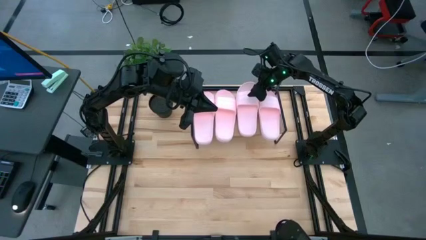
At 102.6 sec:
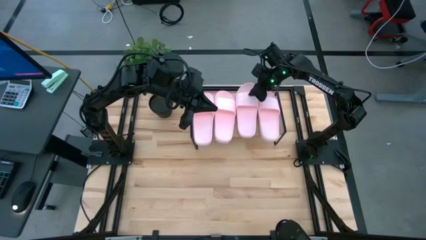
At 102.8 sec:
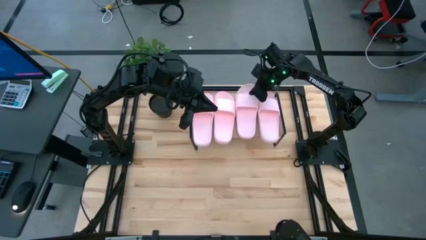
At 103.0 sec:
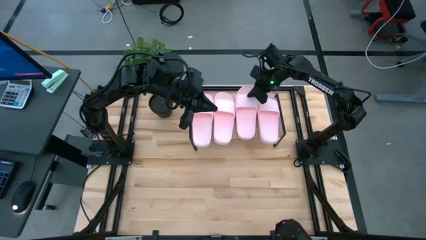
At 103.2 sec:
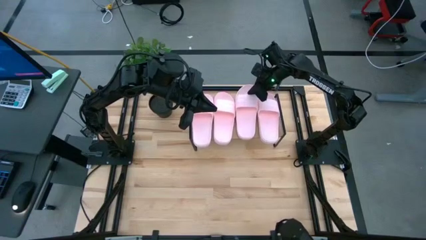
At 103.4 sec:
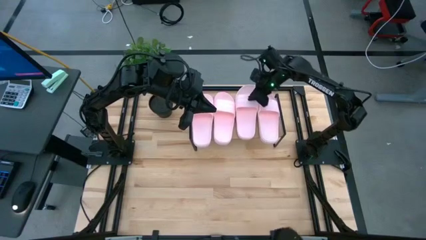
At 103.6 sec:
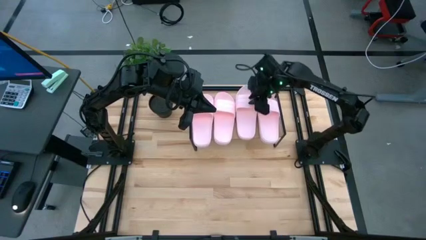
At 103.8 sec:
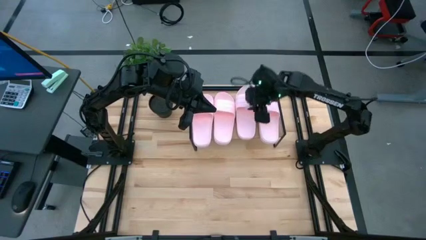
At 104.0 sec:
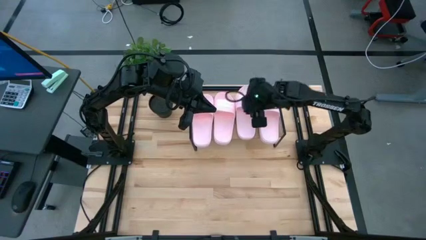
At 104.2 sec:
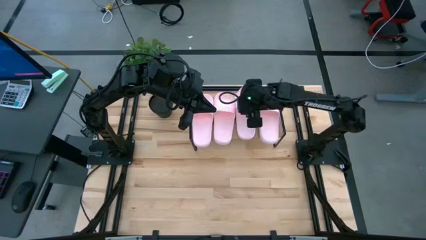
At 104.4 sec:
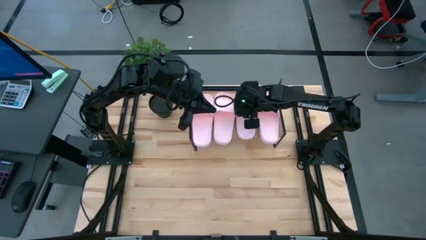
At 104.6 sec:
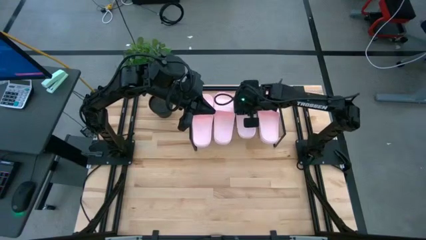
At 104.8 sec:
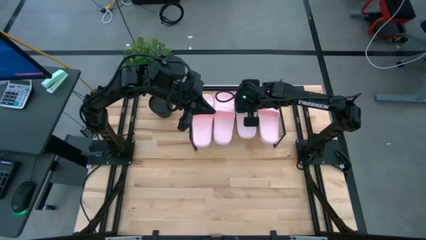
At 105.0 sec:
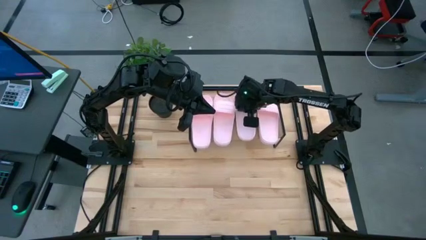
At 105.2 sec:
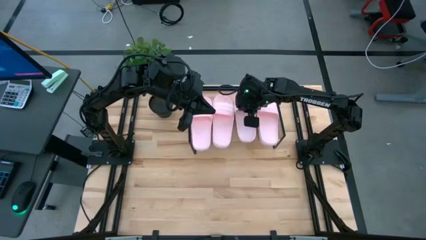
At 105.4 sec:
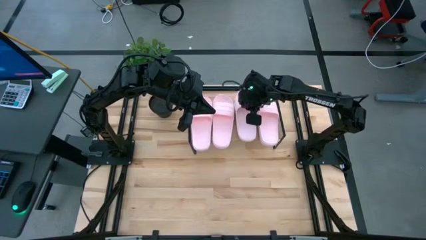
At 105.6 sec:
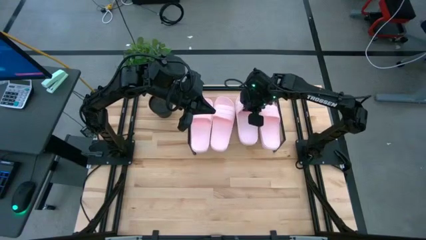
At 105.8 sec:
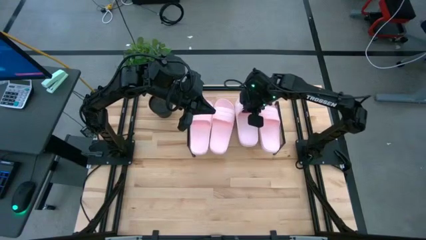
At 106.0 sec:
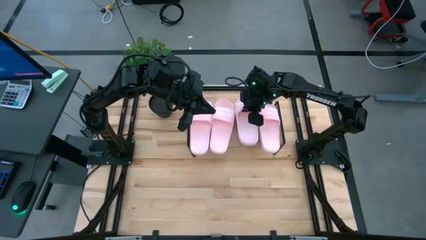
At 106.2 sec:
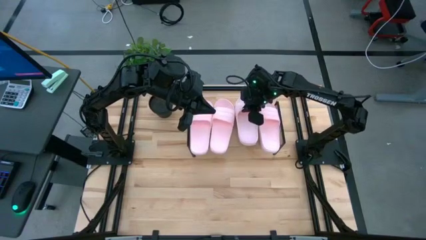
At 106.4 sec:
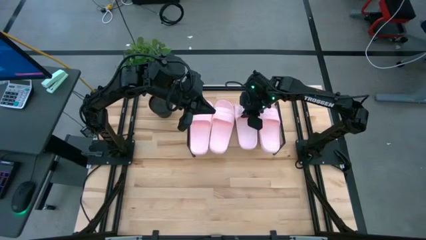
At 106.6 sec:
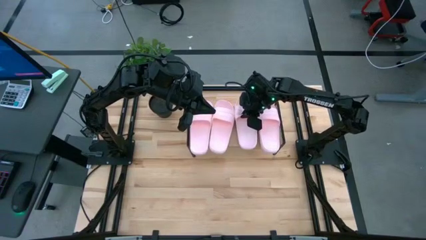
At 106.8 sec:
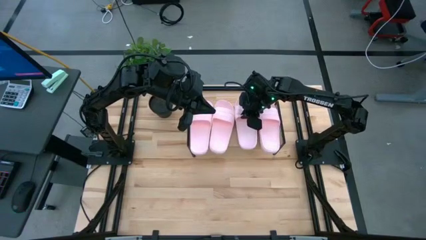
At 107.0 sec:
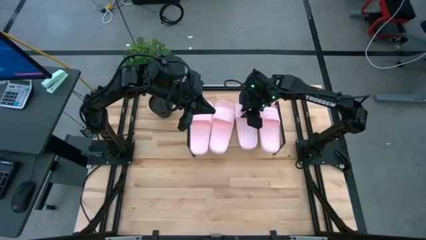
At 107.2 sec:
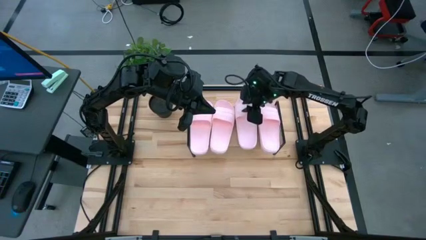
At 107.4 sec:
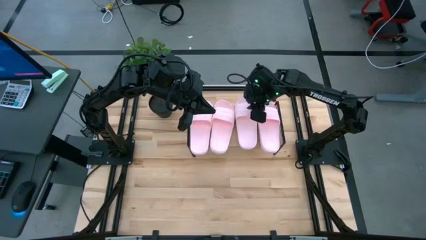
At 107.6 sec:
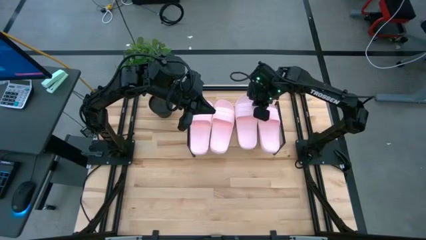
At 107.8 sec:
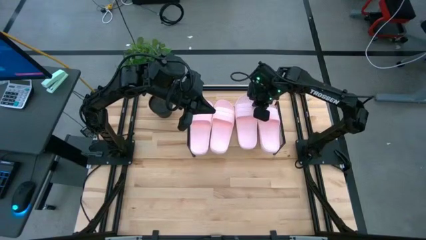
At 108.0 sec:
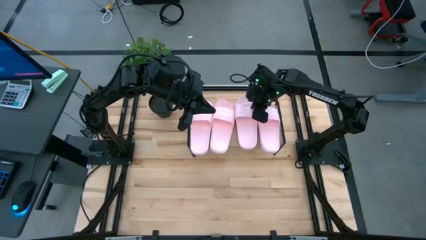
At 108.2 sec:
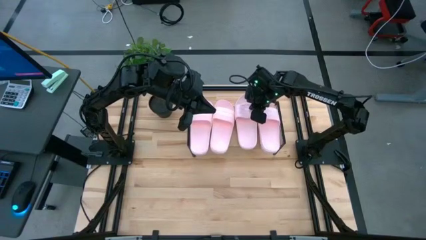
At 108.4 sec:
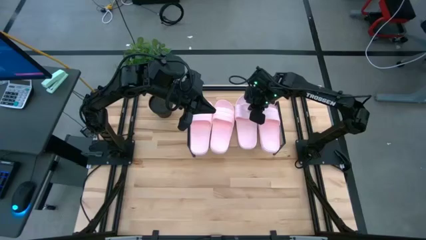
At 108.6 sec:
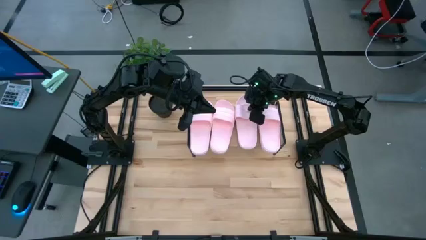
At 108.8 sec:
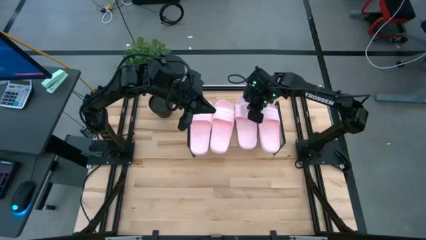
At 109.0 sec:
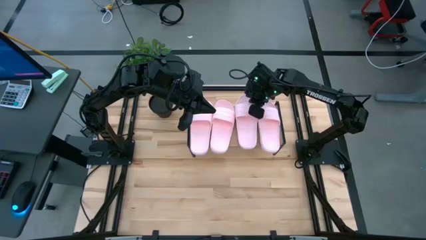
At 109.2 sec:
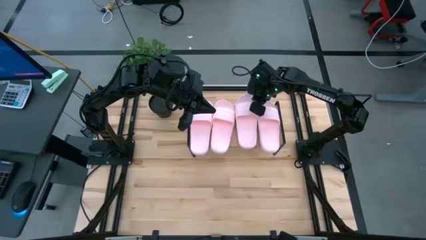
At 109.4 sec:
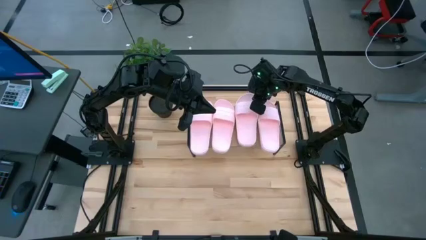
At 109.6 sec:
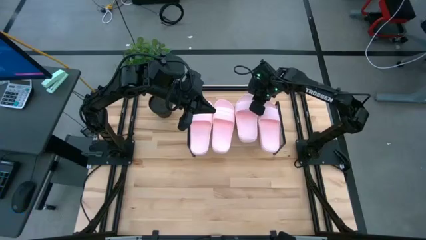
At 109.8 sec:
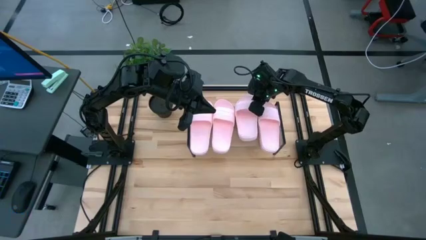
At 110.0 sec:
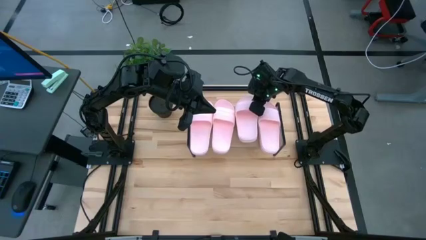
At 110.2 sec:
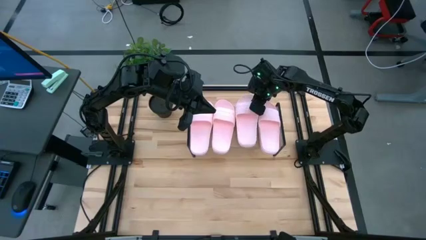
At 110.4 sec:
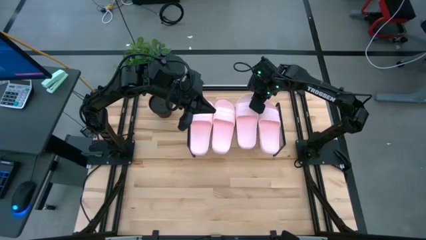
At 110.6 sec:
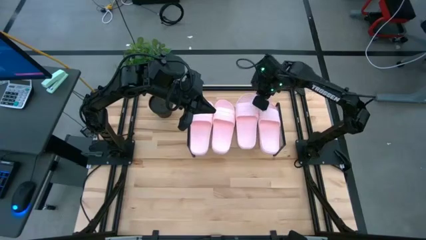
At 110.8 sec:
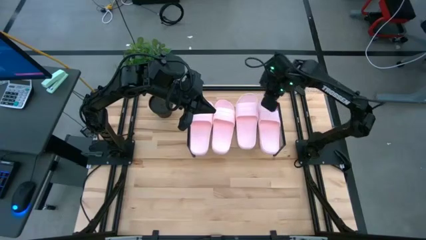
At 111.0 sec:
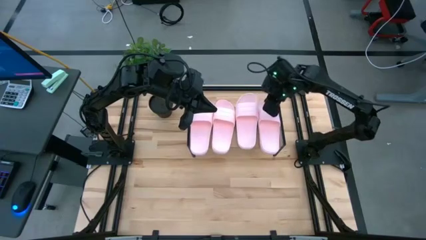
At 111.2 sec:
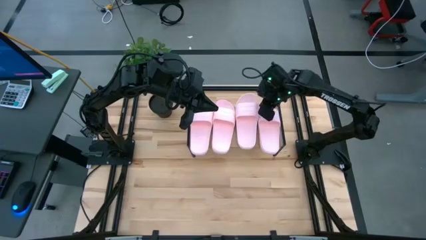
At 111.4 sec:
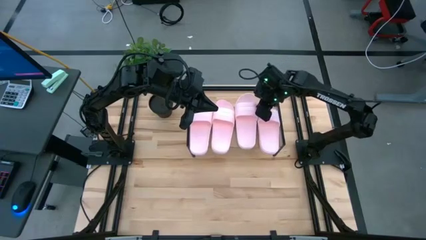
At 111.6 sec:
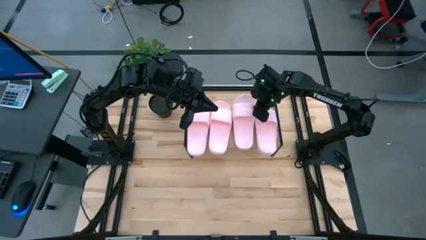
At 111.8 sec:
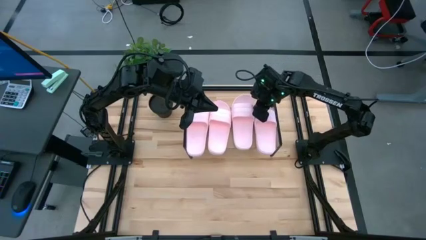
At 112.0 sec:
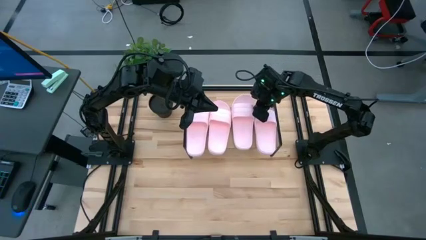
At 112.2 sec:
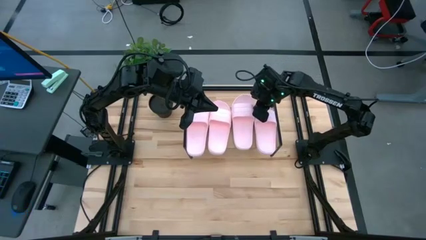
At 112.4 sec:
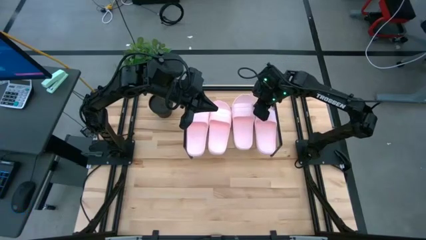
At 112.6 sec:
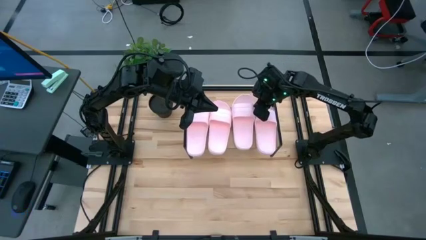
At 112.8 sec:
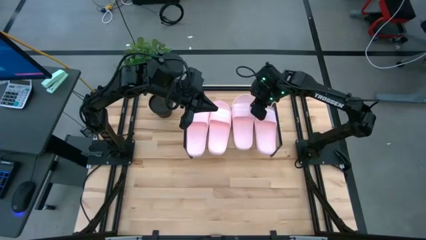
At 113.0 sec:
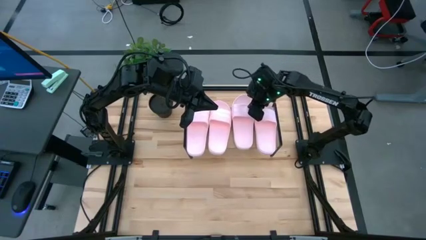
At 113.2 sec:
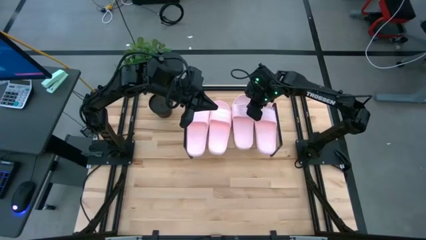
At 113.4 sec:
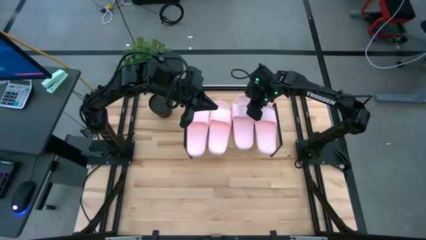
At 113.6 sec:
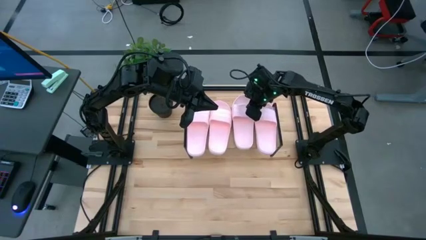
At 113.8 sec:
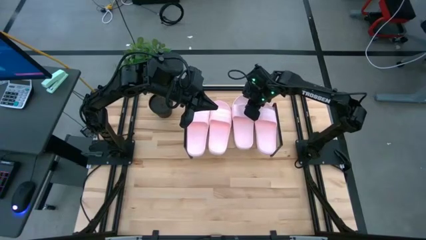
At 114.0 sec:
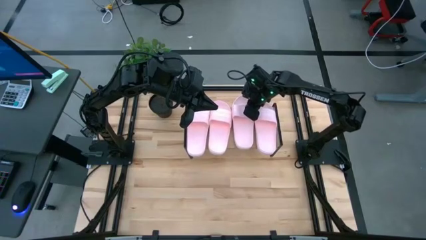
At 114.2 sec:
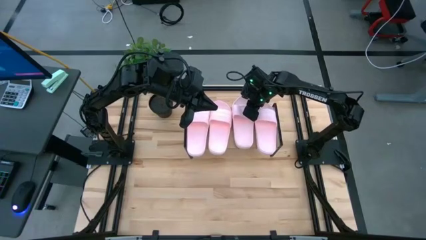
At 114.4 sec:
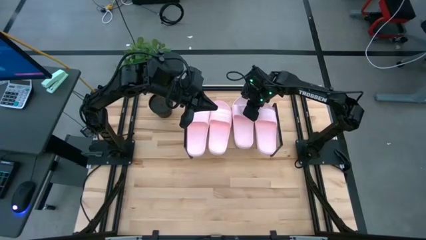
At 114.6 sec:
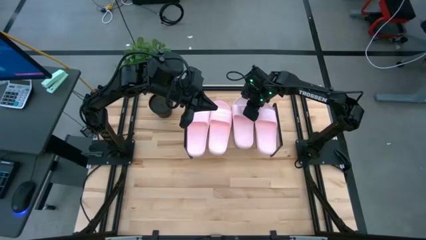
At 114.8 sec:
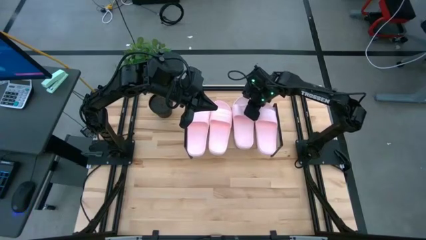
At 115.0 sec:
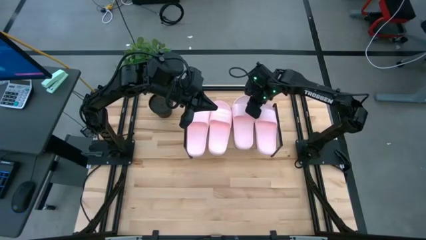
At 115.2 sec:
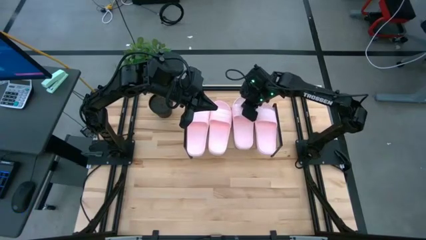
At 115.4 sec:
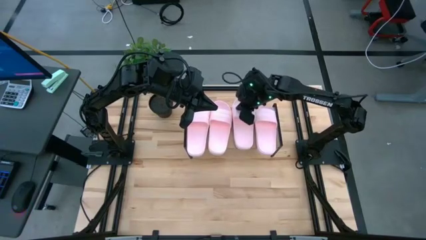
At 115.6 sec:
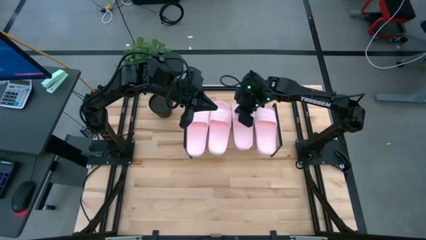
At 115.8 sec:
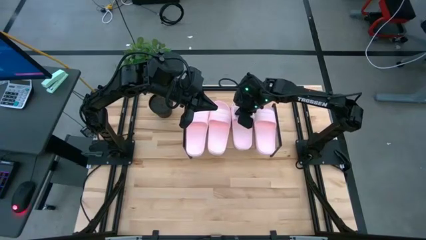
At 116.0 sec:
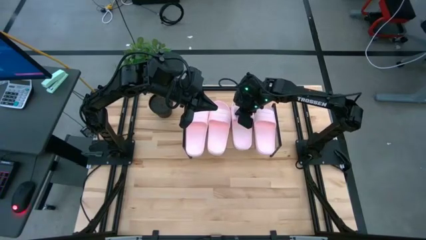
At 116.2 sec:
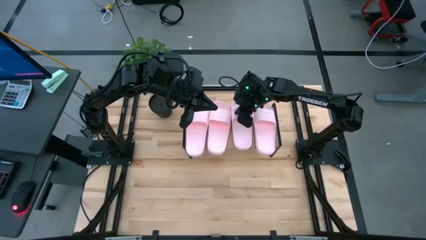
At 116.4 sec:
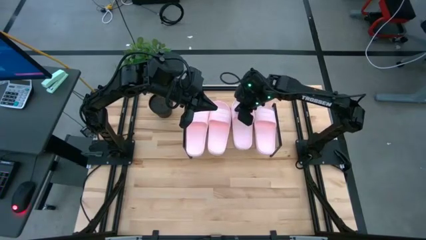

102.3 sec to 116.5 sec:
Task: Pick and place slides into the shelf
Put the pink slide on the shelf
